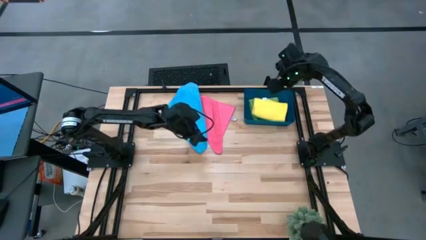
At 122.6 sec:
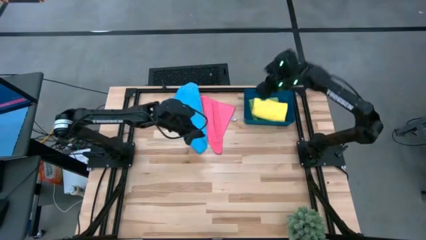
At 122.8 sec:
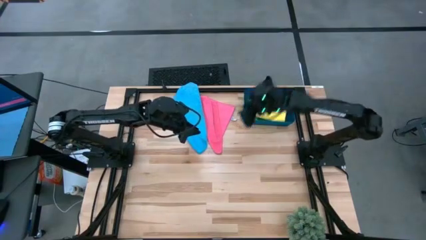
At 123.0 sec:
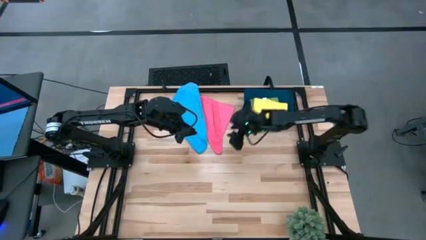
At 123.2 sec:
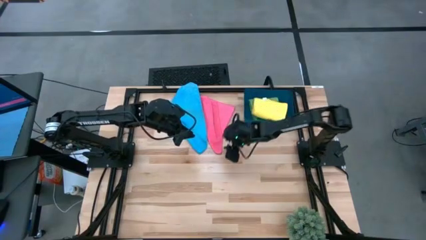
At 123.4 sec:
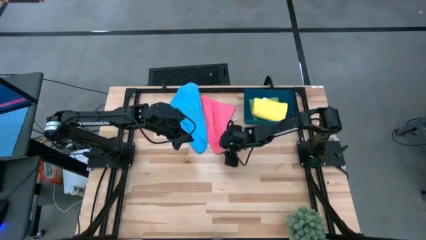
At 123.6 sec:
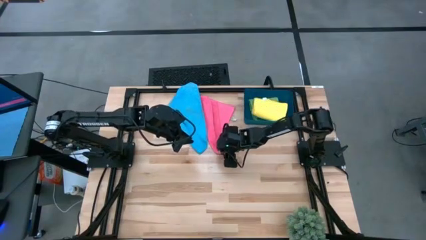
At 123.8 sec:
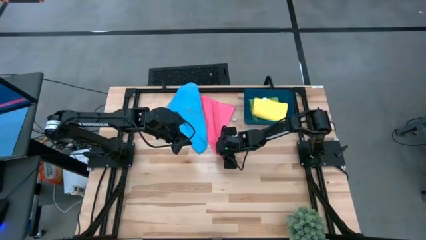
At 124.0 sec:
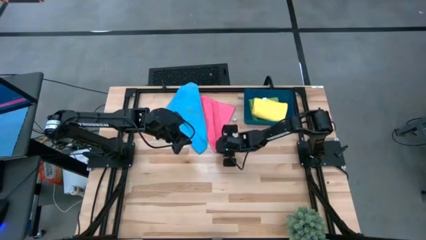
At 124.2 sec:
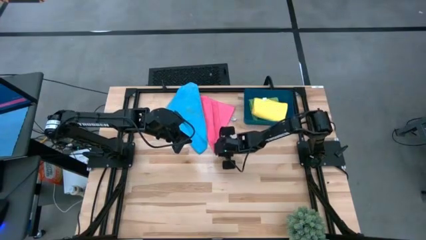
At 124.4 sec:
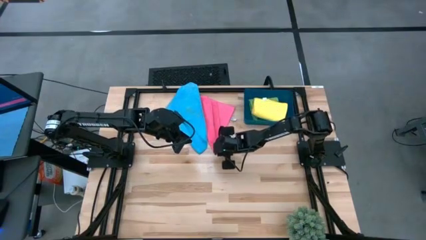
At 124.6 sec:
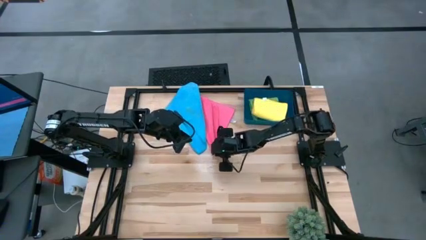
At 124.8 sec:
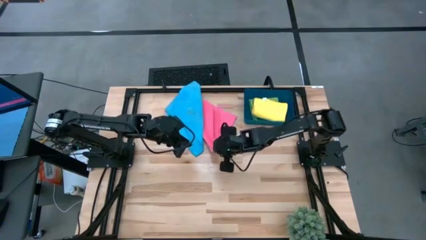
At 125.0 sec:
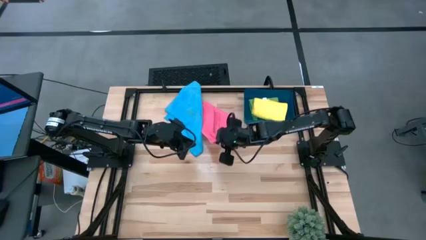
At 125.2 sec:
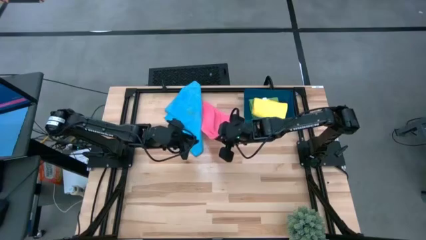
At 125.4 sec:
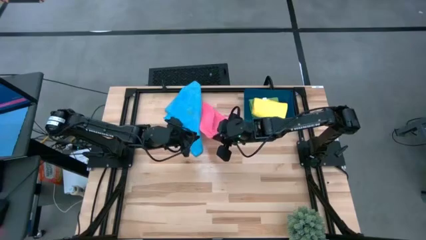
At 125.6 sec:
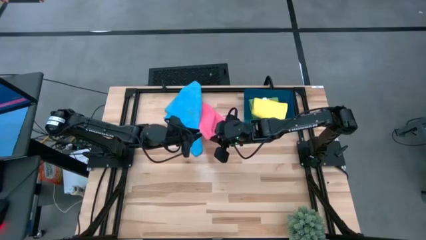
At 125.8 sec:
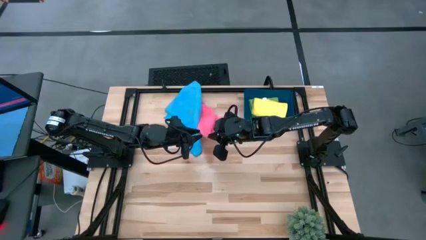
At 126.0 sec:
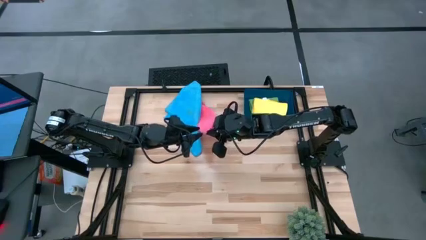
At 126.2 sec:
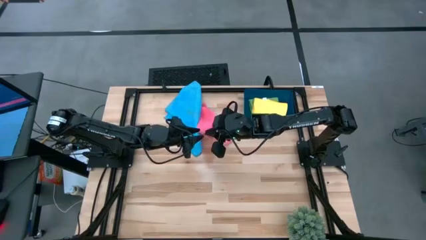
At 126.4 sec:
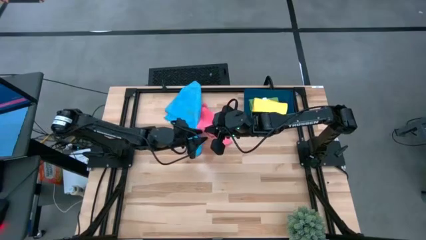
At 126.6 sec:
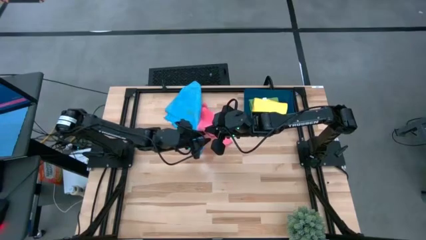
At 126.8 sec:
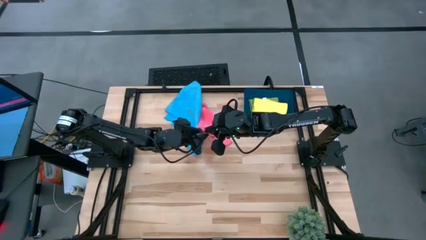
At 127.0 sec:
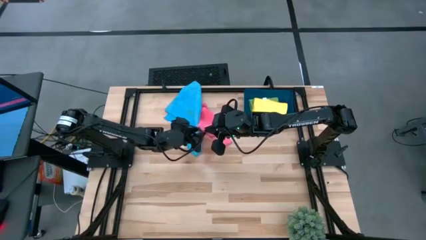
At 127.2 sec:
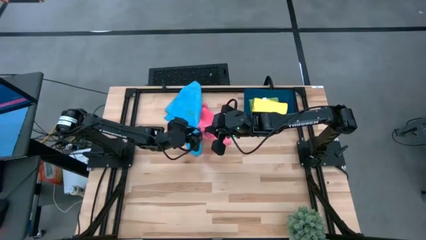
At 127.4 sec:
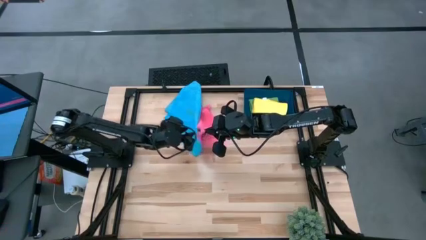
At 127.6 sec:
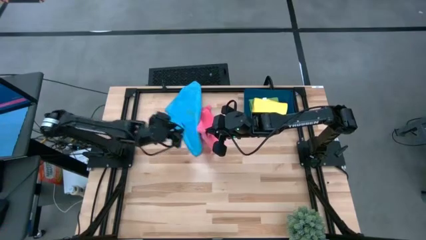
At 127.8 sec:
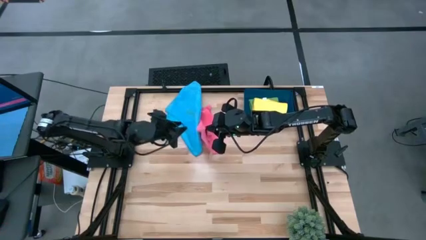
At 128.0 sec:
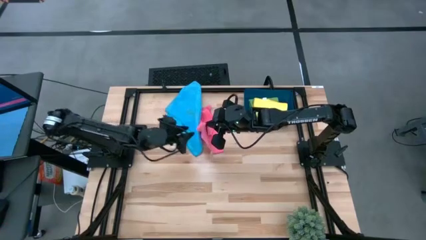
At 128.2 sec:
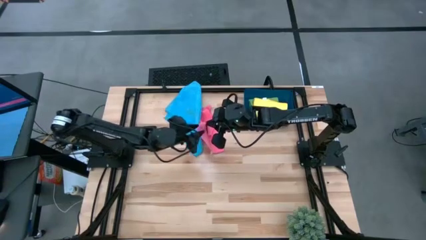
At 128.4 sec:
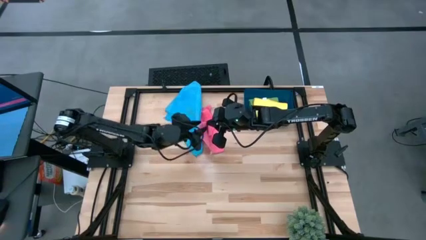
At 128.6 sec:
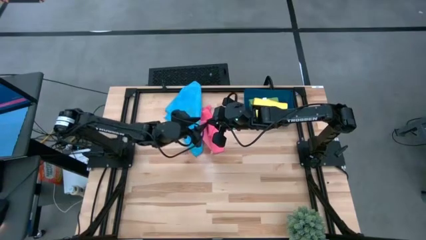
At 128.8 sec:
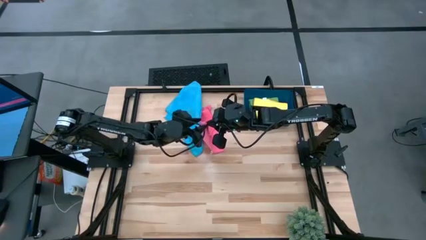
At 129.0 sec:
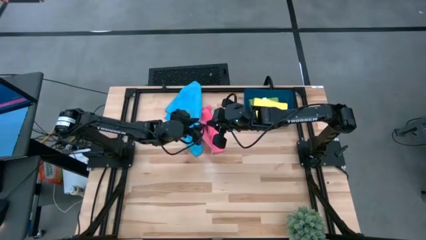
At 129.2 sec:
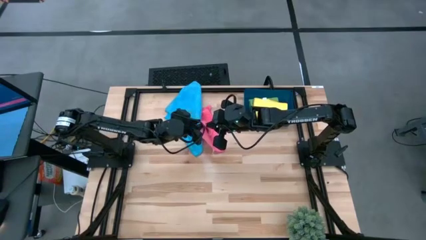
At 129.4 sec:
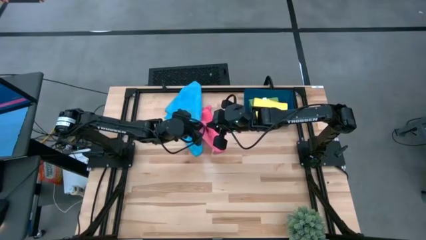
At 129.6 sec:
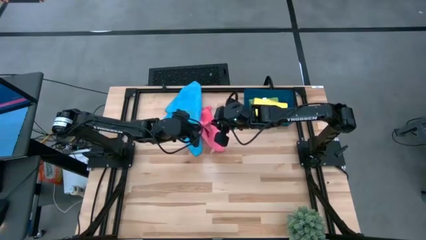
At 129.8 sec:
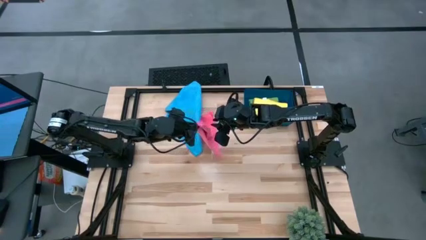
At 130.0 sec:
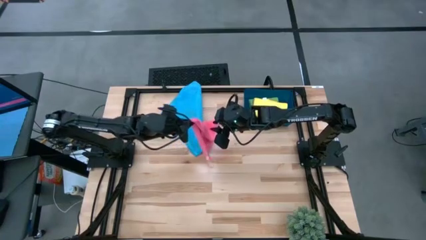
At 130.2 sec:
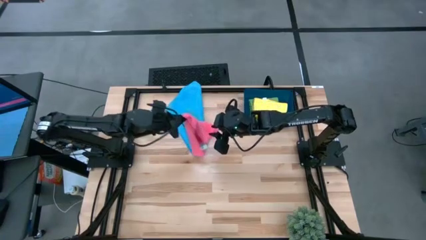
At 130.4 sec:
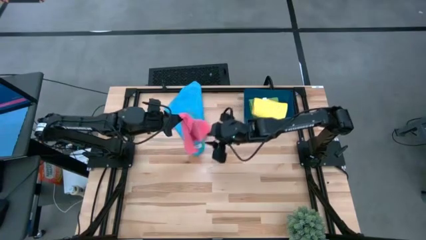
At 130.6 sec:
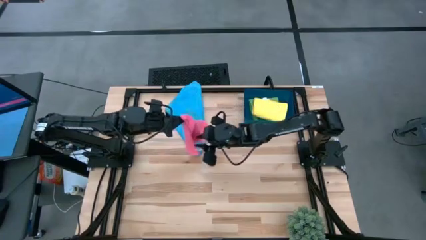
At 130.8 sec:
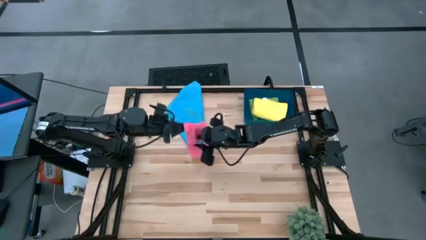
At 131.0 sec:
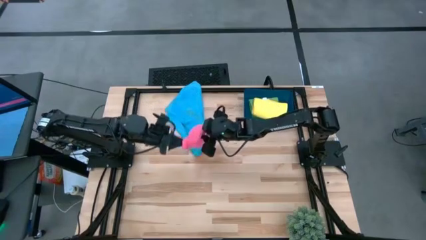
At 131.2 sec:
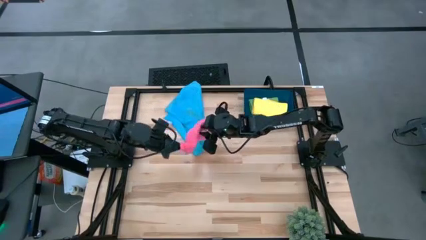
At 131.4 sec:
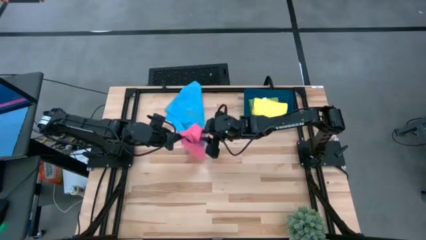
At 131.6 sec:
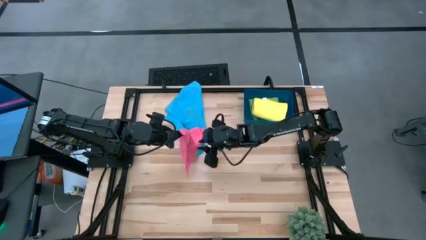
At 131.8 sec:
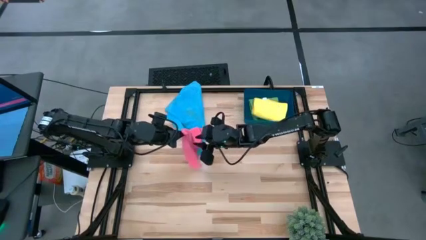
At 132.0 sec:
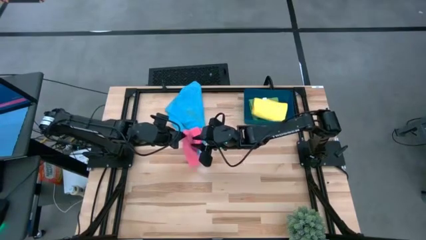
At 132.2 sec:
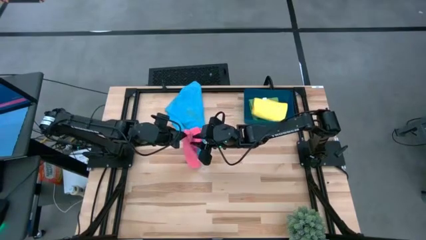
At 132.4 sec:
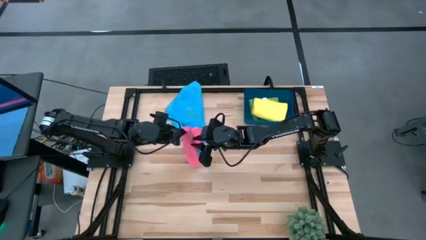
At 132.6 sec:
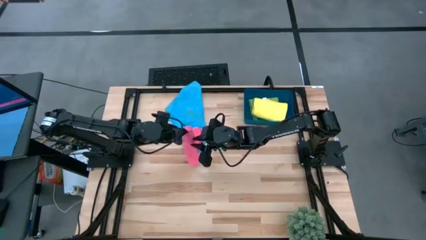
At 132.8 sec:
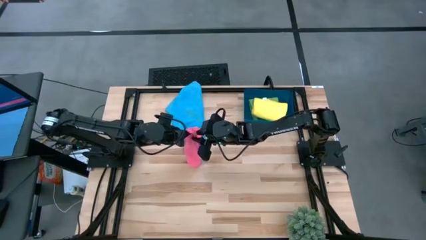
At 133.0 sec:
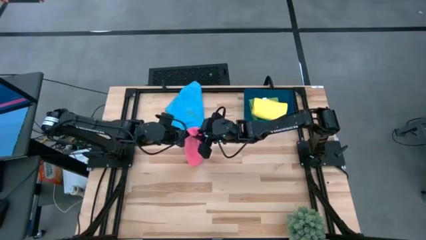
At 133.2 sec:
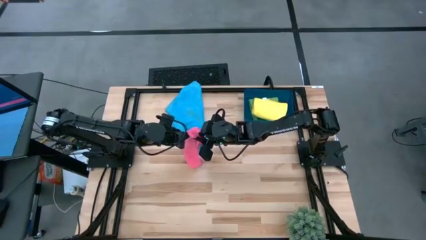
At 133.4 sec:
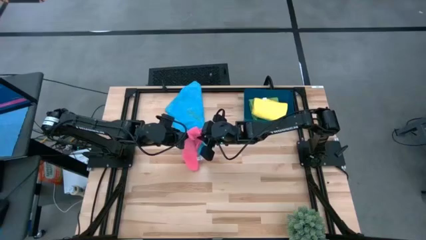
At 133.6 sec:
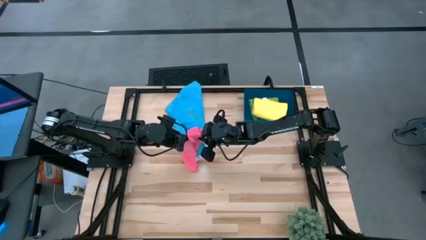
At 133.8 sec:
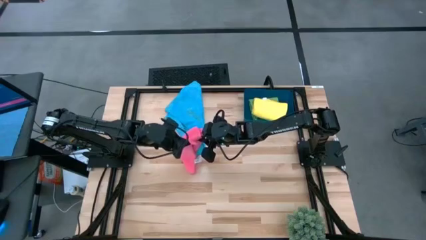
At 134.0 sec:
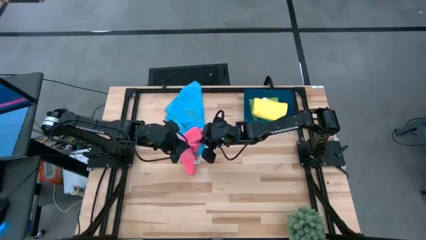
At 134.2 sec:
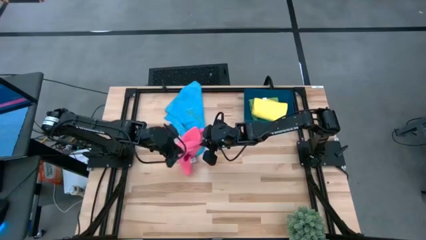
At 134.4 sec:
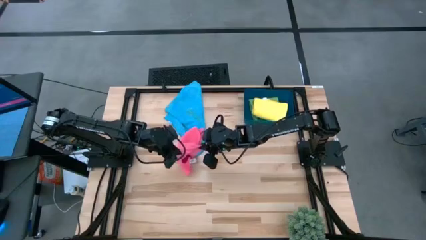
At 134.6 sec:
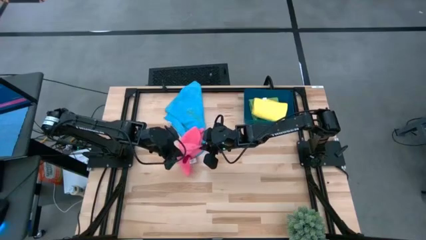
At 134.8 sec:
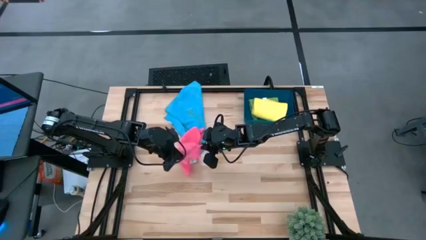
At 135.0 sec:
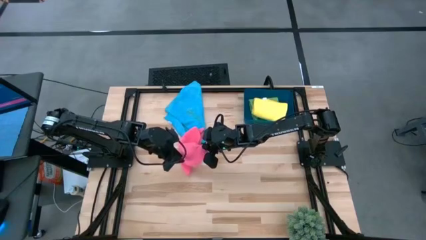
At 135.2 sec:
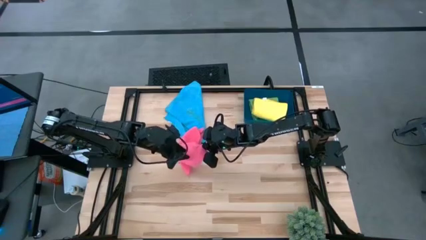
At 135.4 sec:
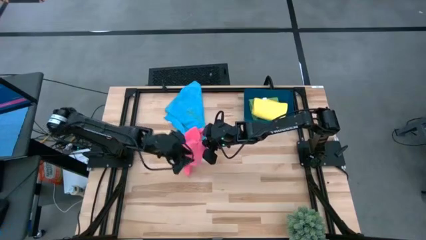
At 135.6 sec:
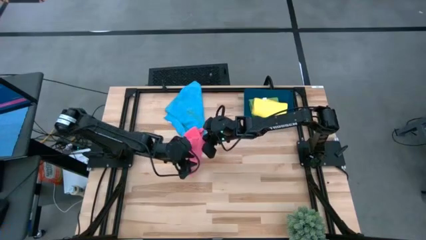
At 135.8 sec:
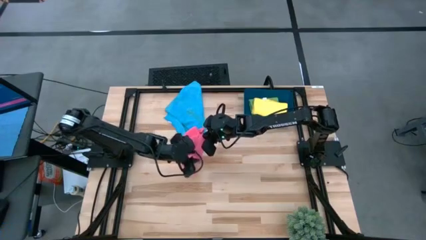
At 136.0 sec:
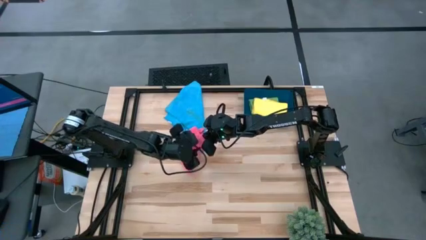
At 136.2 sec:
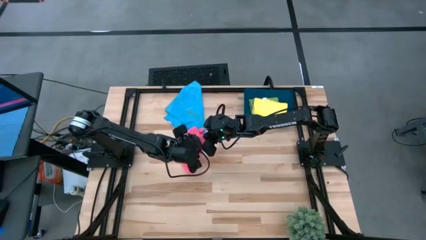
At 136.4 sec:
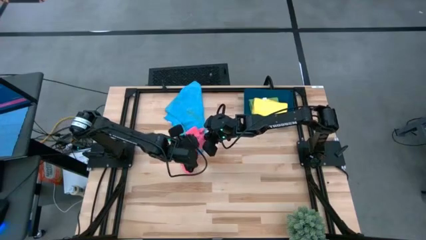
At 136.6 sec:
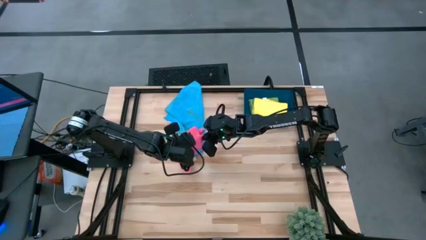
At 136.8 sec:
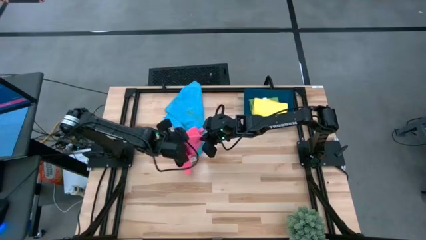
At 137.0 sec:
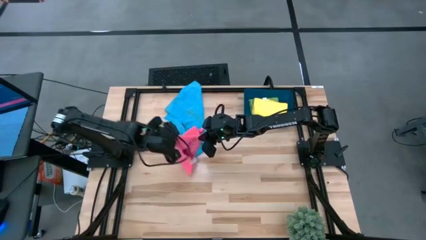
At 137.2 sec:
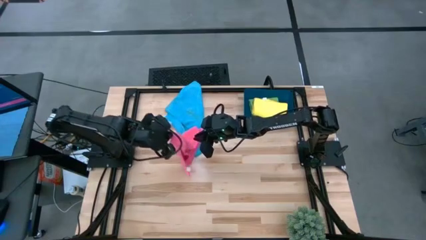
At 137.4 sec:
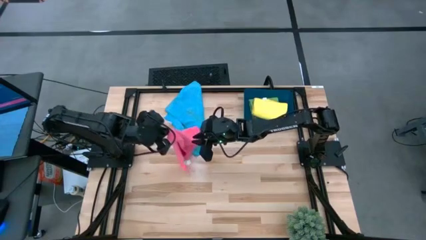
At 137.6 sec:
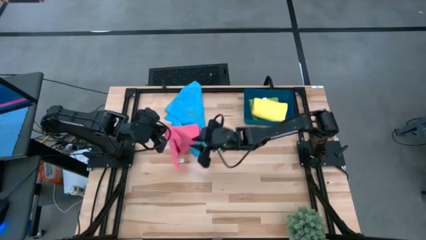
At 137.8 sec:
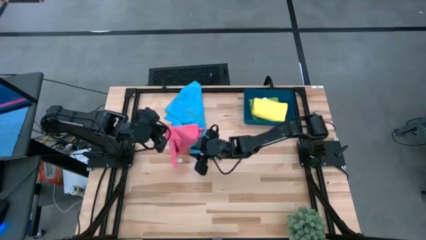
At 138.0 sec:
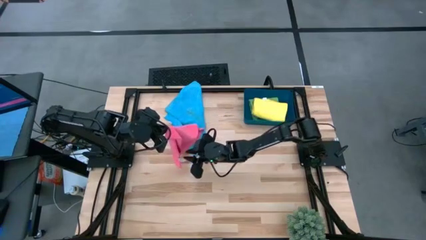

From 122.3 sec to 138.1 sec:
Task: Fold microfiber towels
Fold the pink microfiber towel

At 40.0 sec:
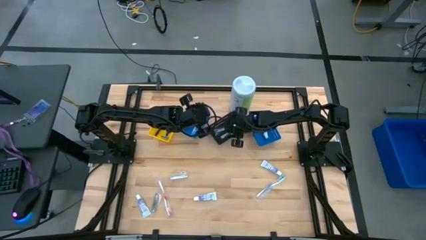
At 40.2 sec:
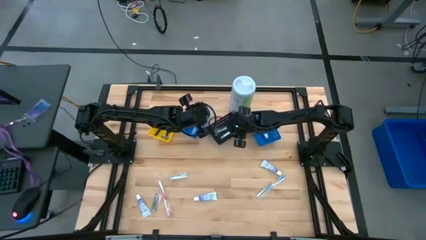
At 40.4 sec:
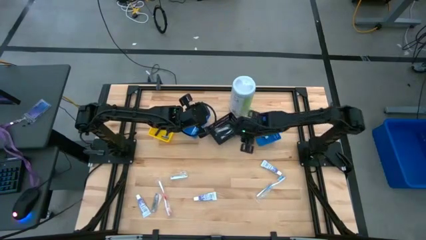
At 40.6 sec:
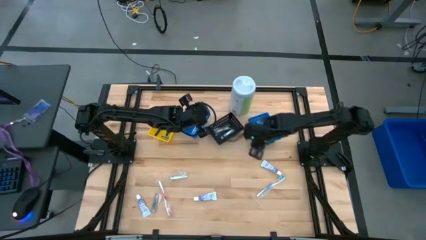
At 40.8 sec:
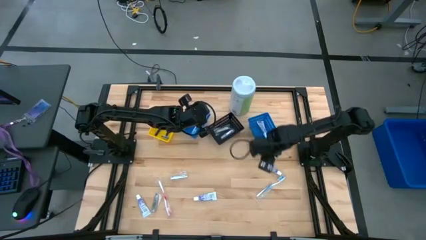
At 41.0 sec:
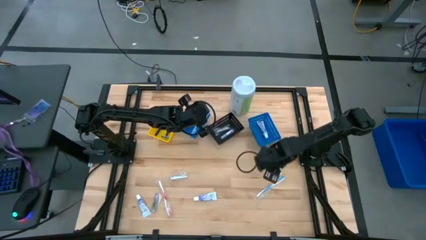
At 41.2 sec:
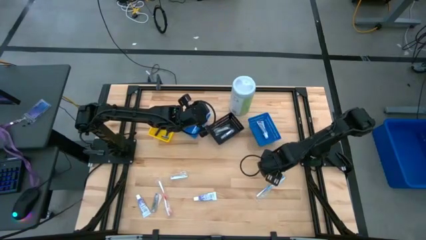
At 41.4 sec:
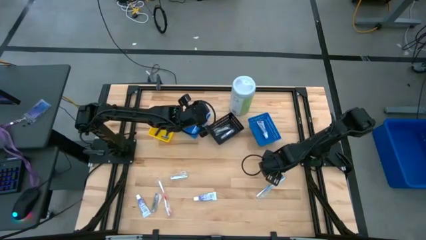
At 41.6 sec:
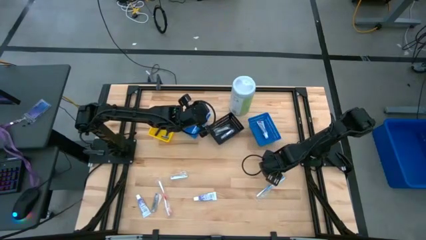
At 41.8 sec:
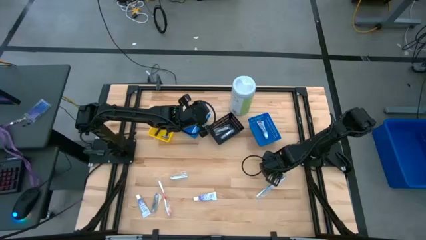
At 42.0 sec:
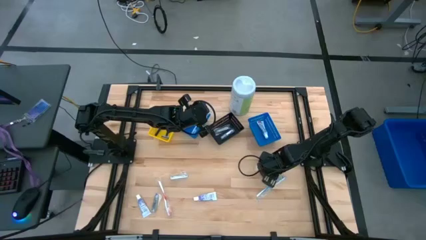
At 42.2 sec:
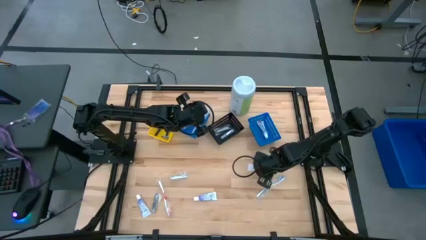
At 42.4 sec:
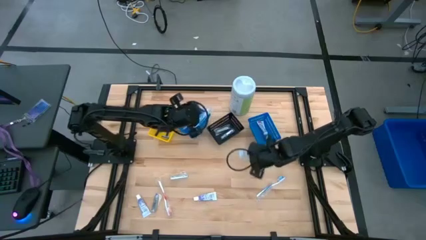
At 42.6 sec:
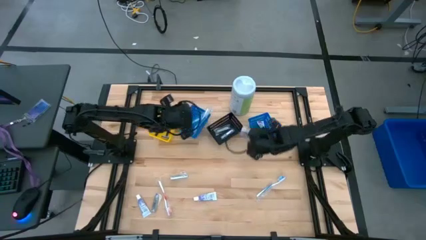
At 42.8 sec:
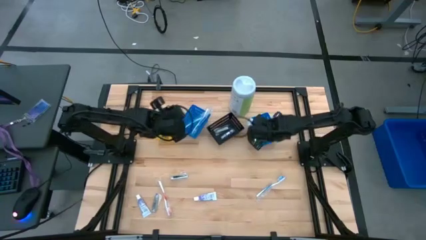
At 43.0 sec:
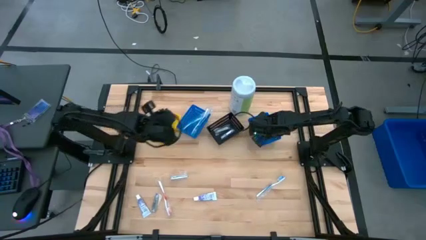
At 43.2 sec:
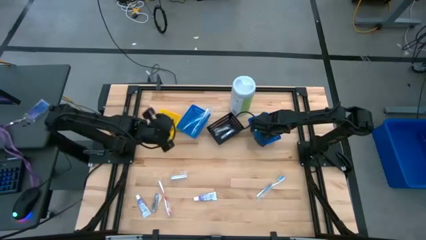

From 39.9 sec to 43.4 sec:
Task: Pick & Place Travel size toiletries
Put the white toothpaste into the right blue basket
